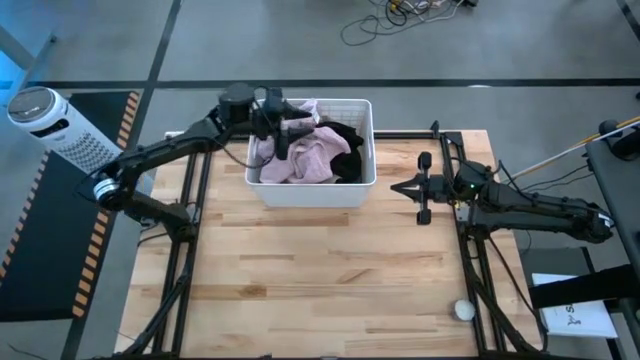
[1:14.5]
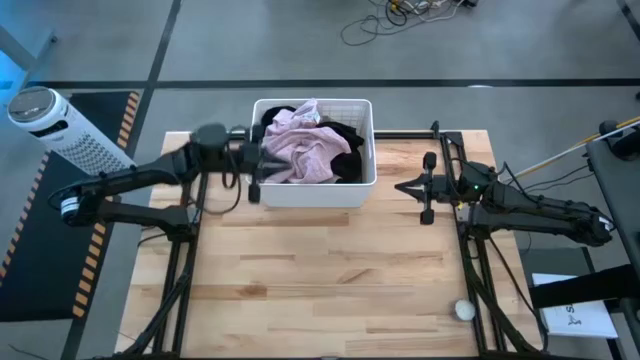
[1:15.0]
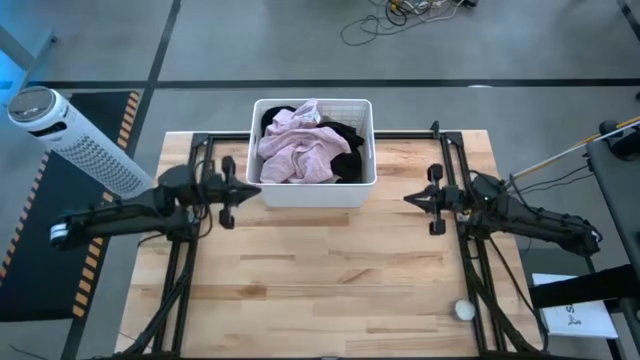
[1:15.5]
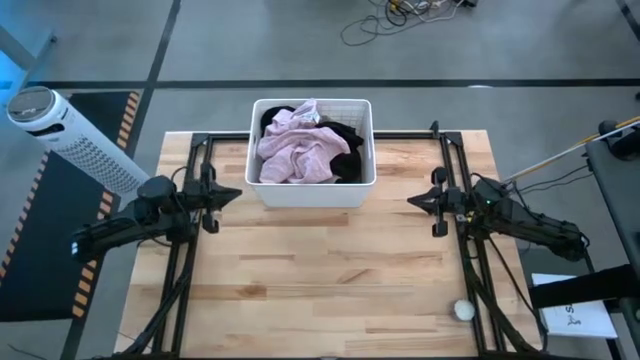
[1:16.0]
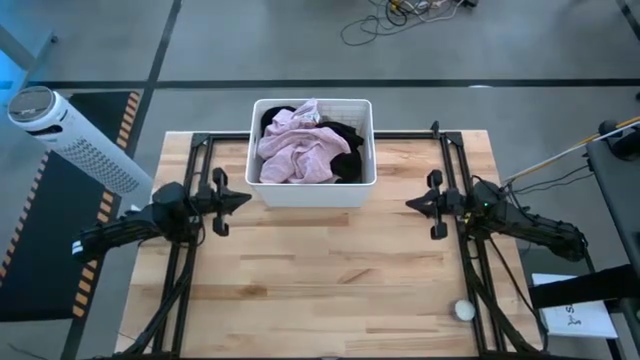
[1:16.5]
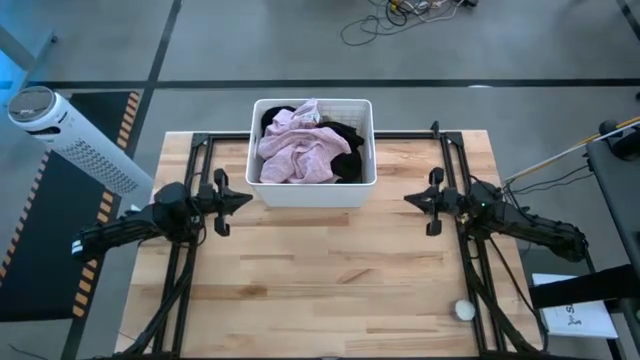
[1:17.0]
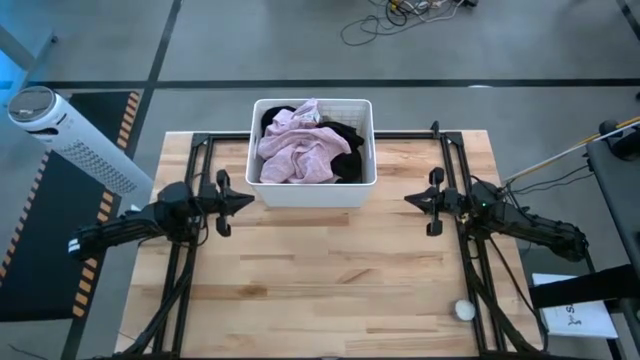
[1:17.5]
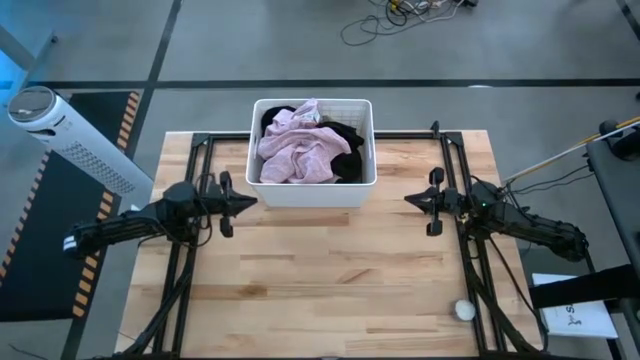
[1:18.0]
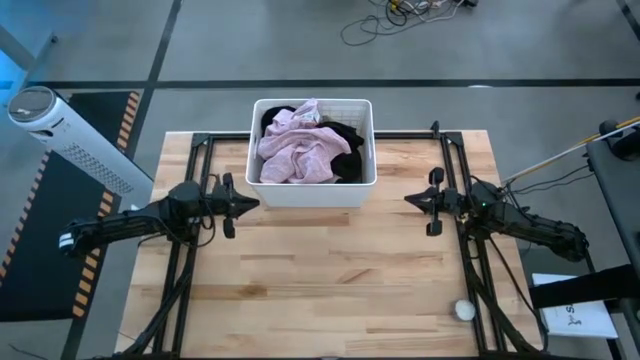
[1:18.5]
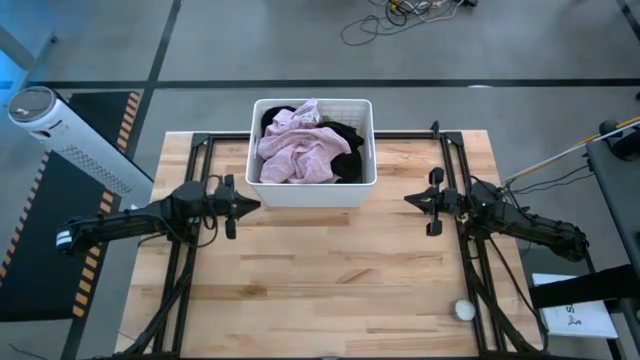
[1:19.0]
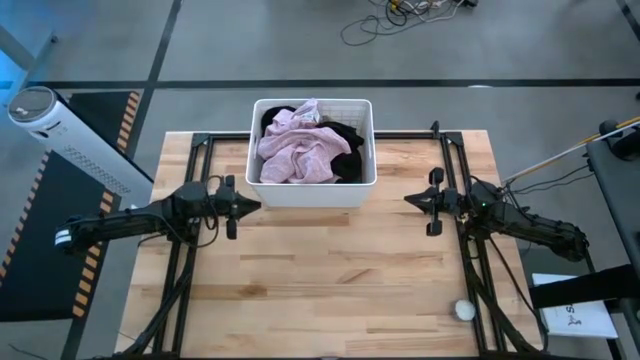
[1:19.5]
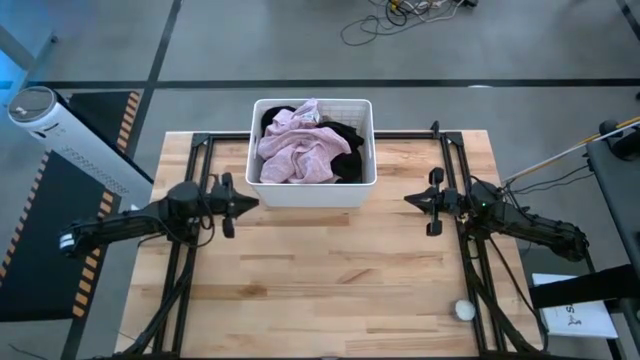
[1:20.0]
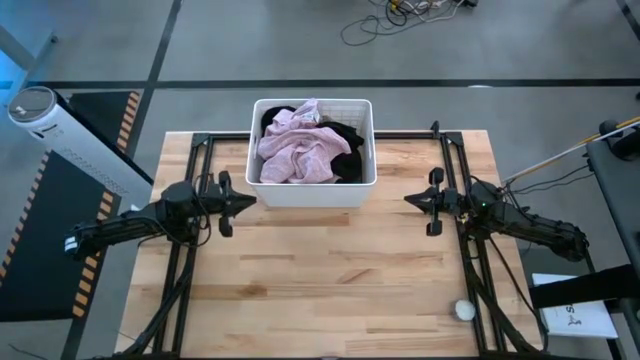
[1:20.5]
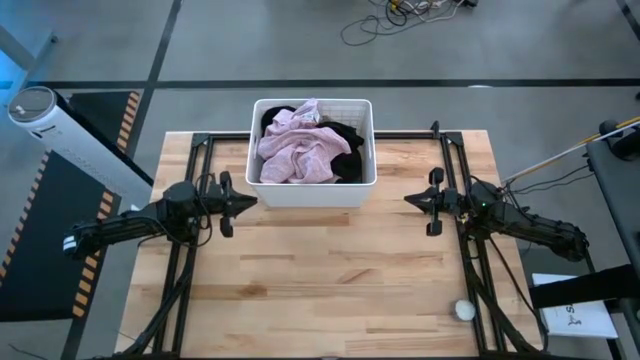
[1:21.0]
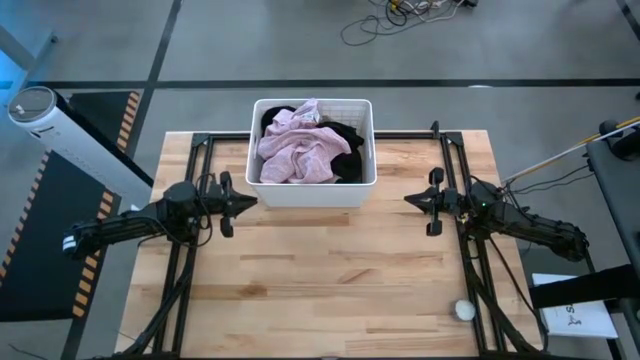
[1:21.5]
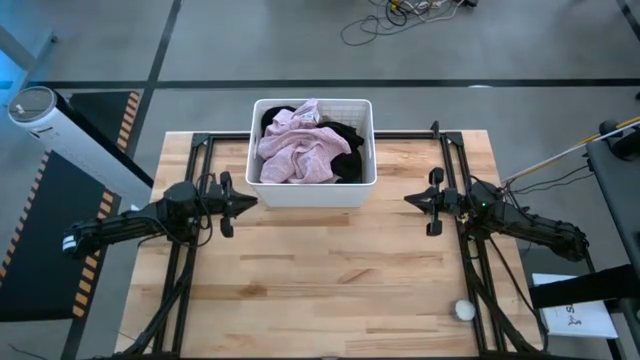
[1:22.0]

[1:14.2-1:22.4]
Task: Sort clothes
Return to Home Position

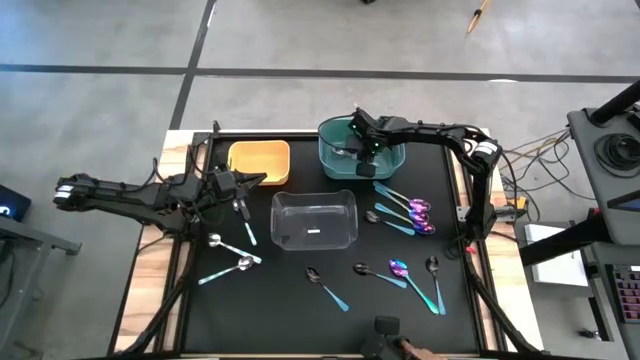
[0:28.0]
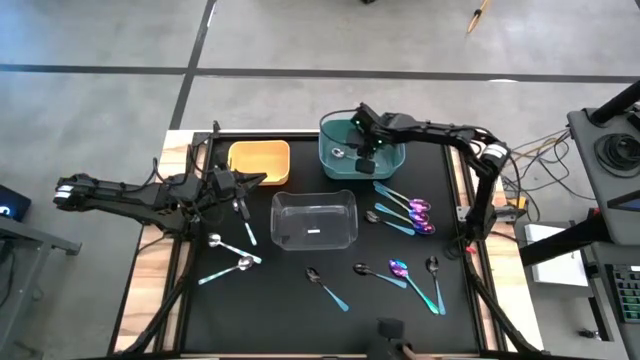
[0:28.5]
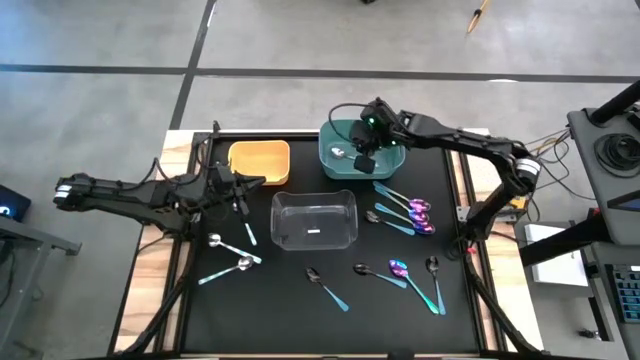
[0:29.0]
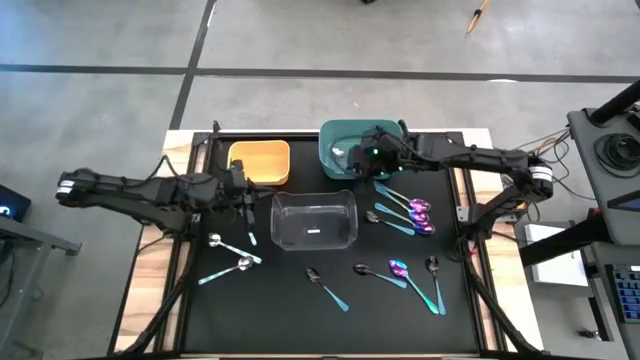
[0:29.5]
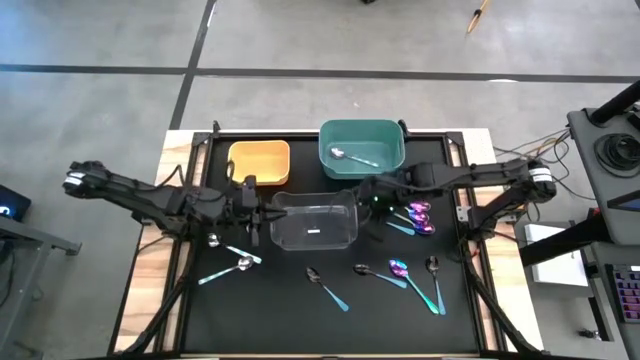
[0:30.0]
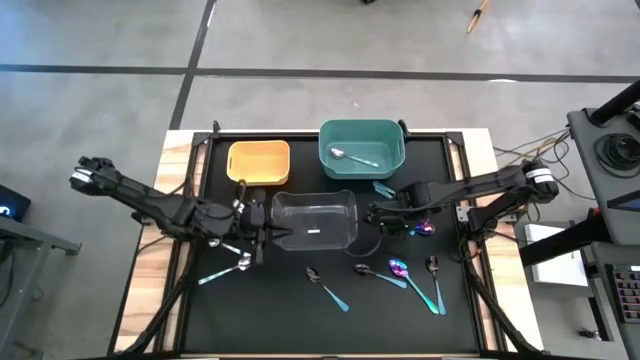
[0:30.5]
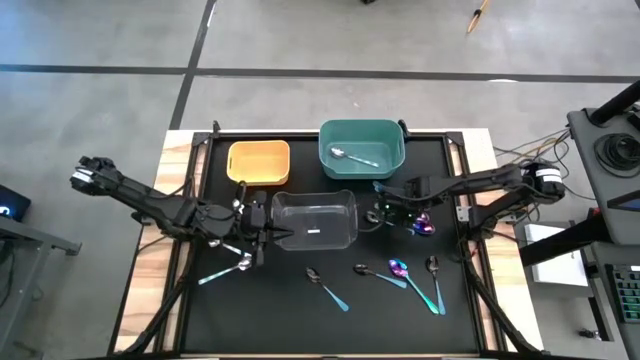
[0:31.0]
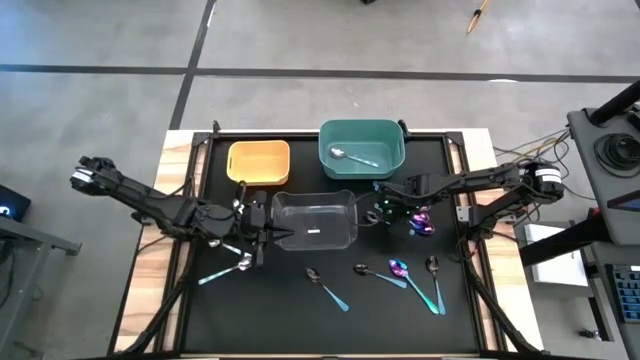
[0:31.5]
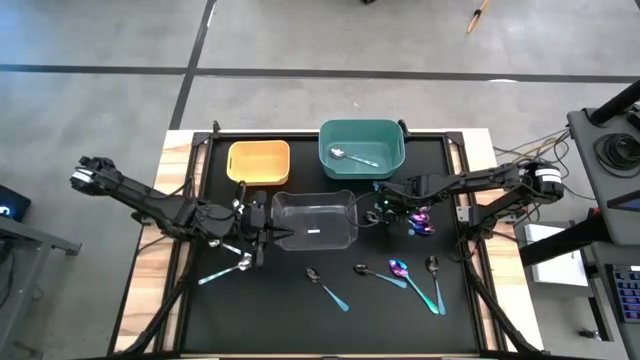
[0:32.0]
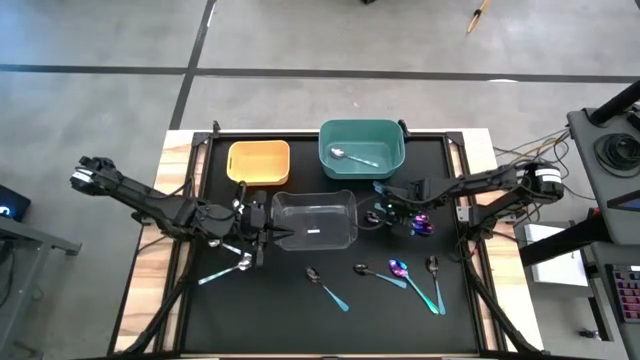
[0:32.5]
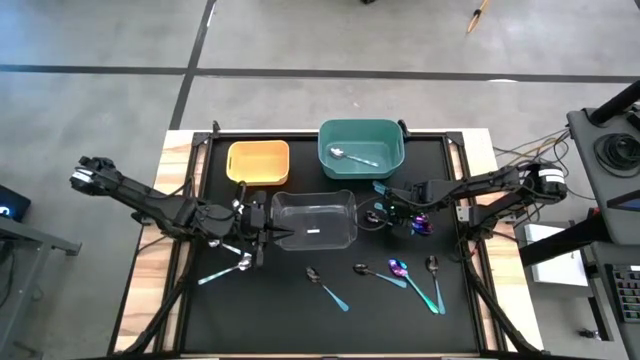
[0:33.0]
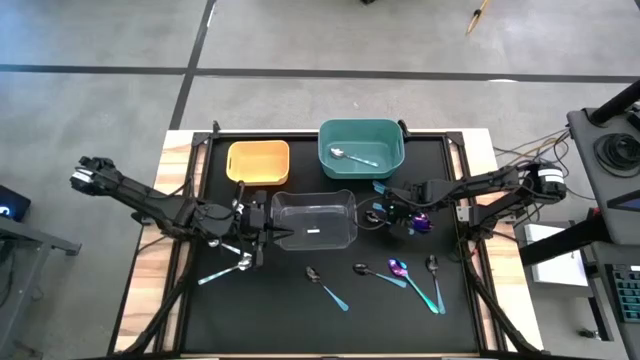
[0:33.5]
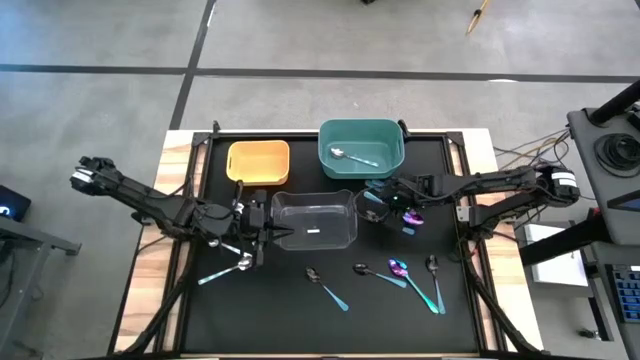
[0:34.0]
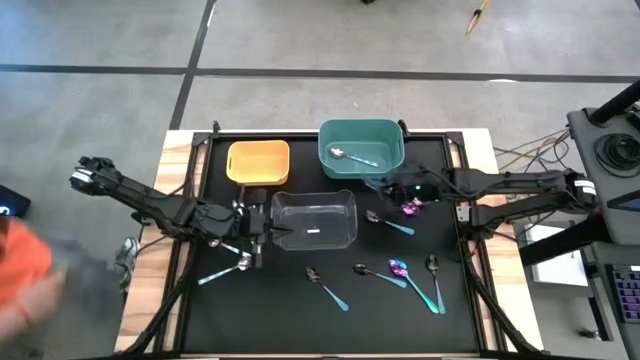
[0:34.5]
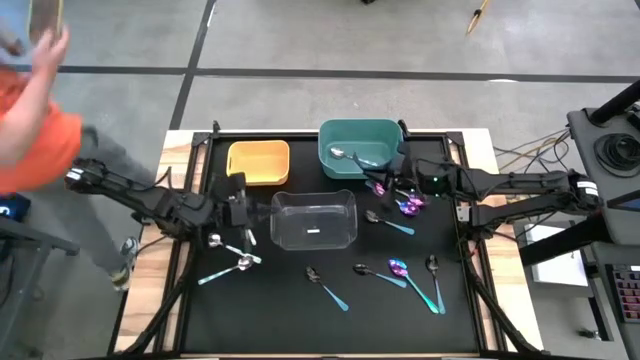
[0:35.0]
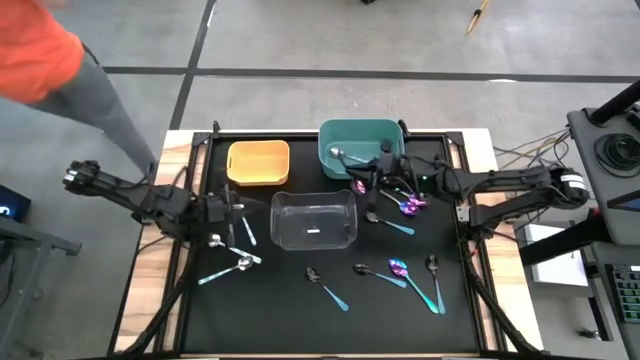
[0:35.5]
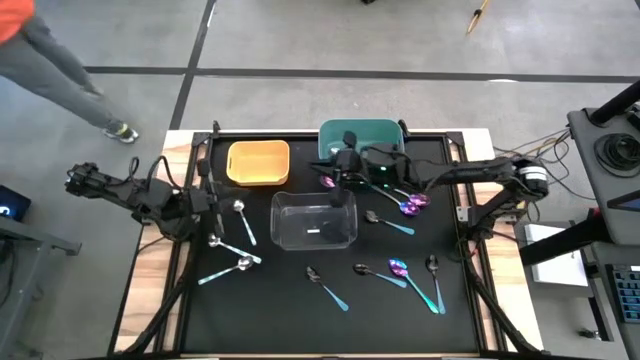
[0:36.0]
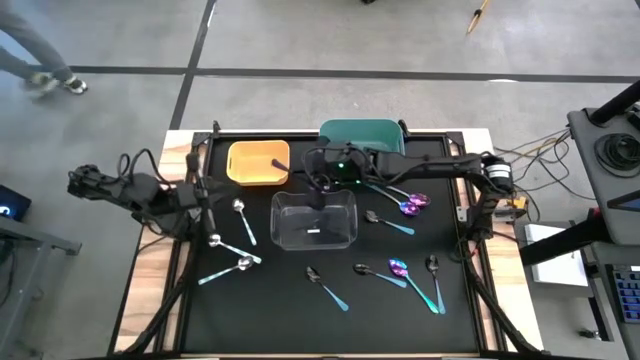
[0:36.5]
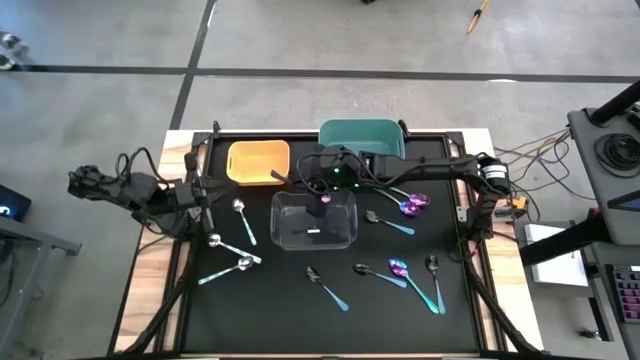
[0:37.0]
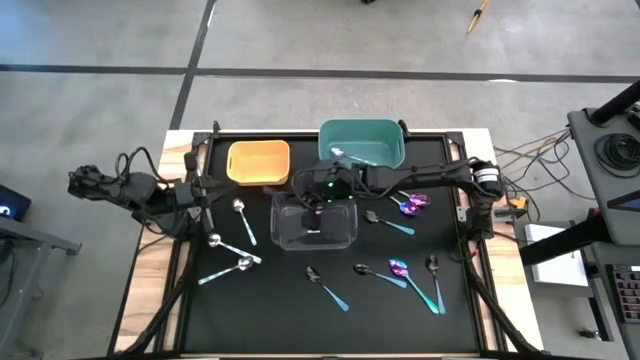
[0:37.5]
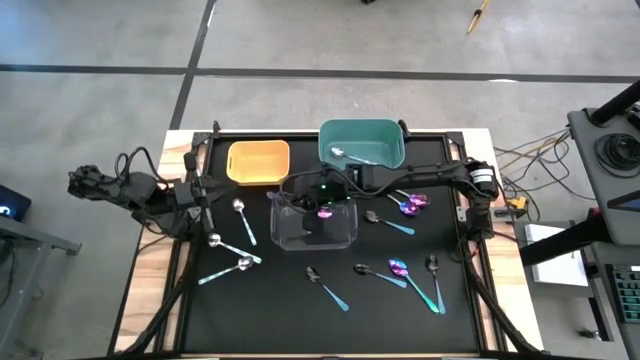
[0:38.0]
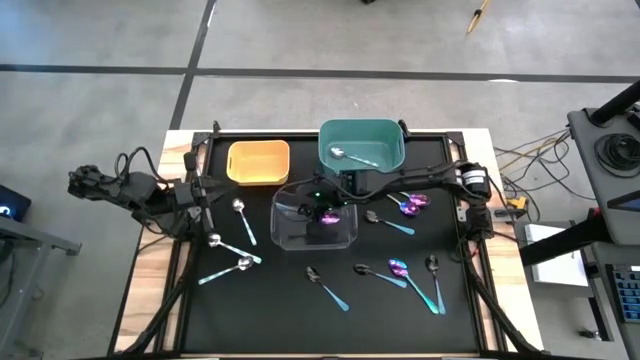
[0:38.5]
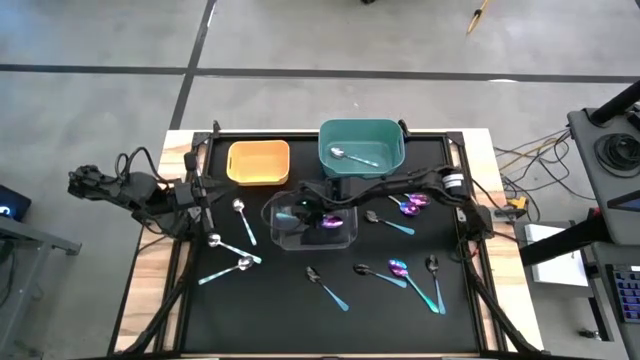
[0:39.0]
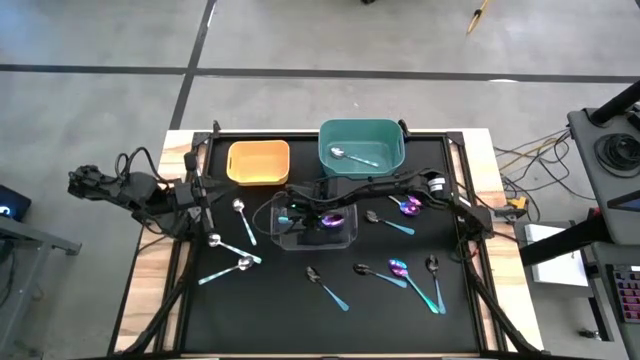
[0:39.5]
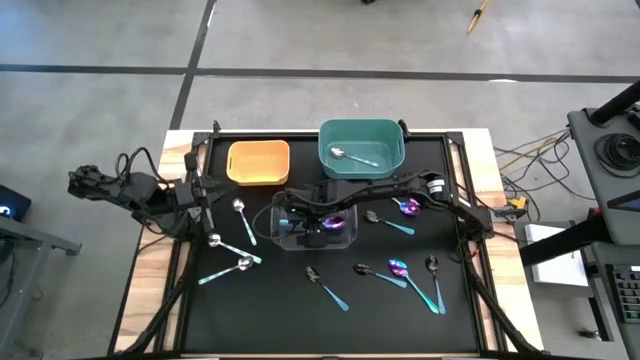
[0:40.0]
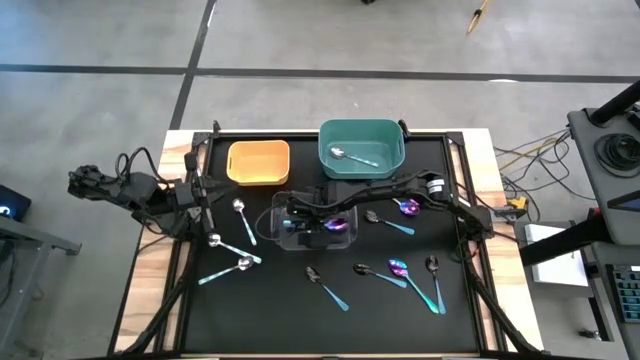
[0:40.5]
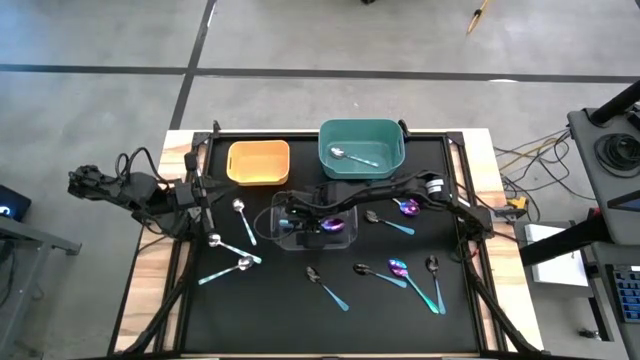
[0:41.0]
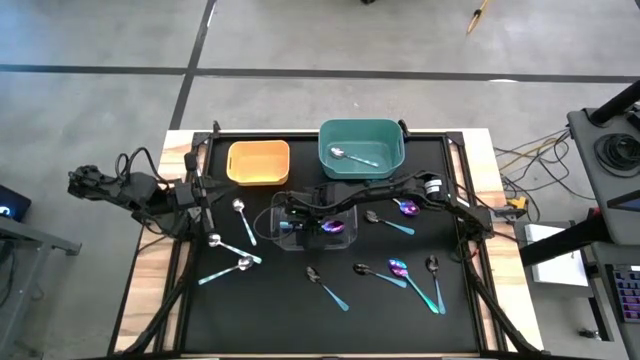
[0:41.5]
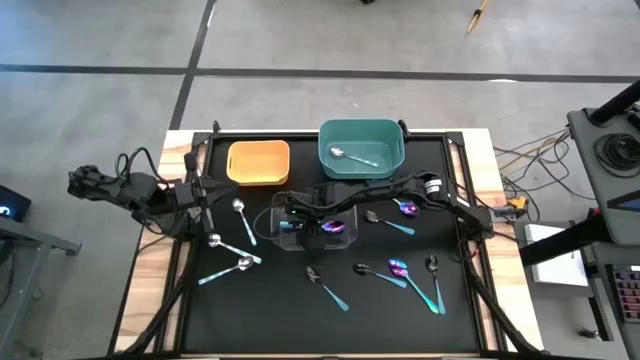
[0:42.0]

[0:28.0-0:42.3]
Task: Sort silverware by color (type)
Put the violet spoon into the transparent bin
